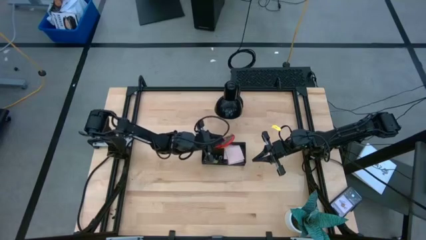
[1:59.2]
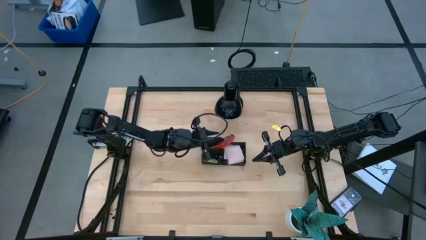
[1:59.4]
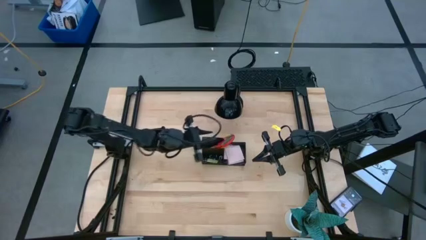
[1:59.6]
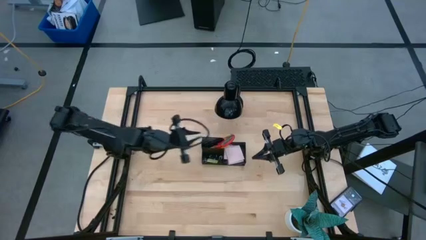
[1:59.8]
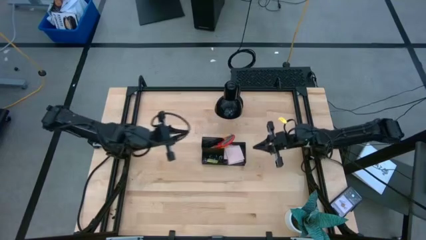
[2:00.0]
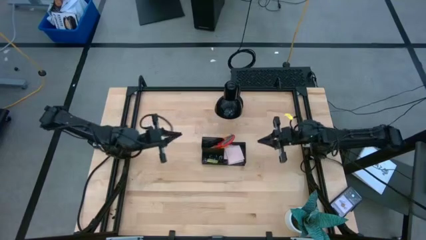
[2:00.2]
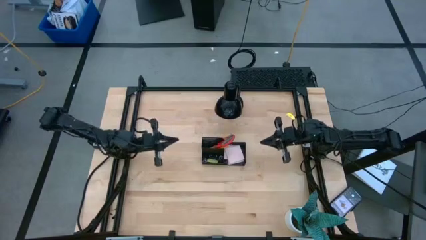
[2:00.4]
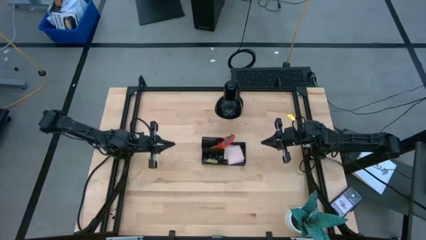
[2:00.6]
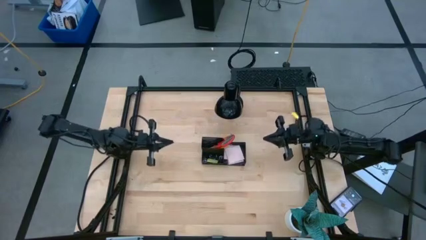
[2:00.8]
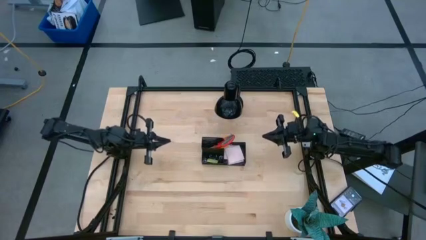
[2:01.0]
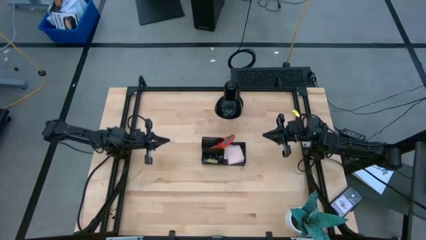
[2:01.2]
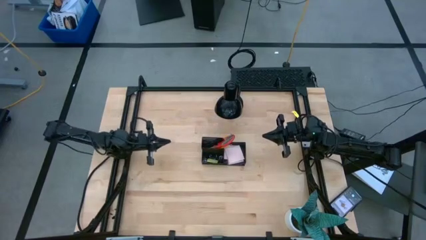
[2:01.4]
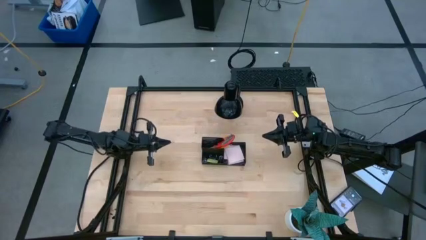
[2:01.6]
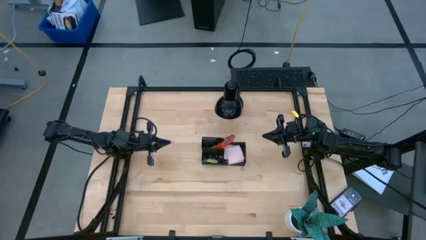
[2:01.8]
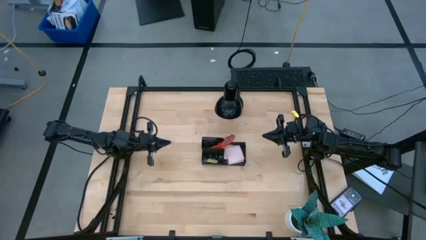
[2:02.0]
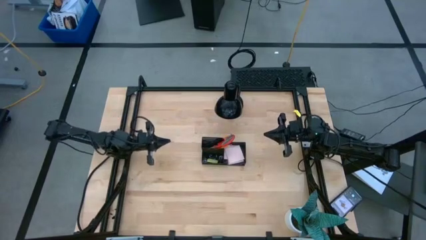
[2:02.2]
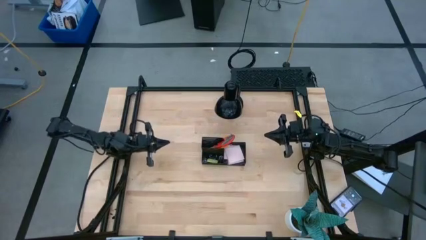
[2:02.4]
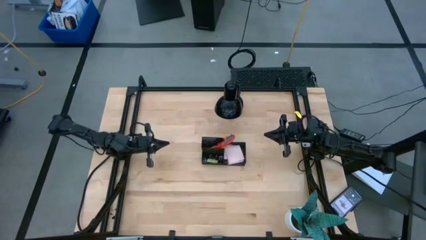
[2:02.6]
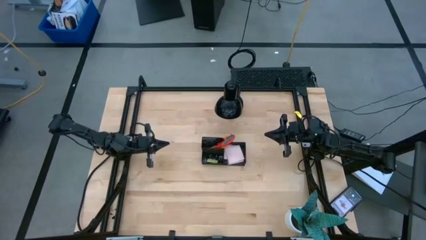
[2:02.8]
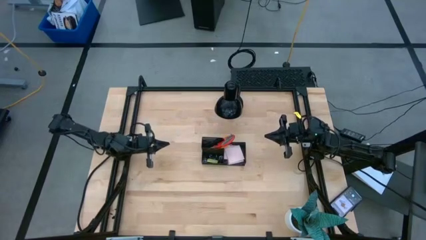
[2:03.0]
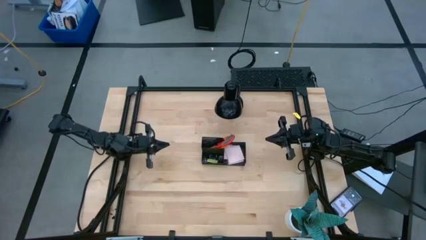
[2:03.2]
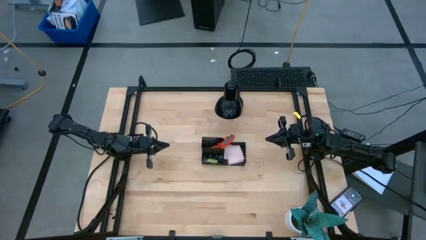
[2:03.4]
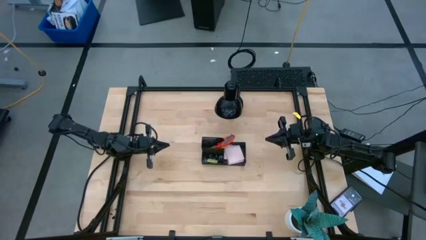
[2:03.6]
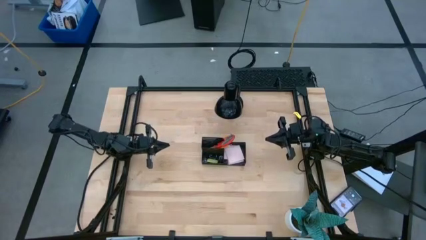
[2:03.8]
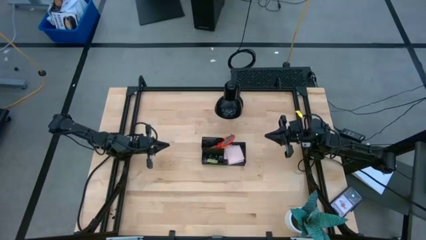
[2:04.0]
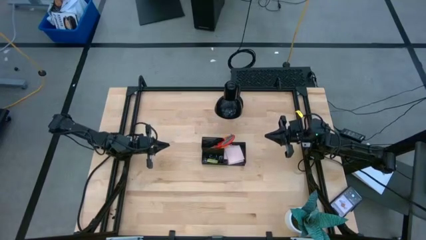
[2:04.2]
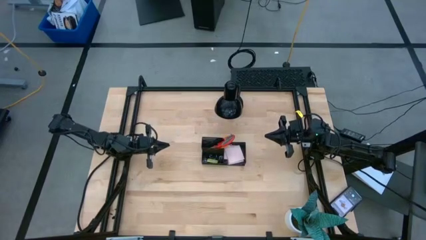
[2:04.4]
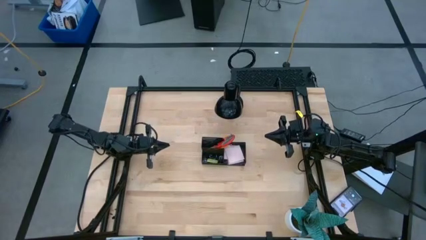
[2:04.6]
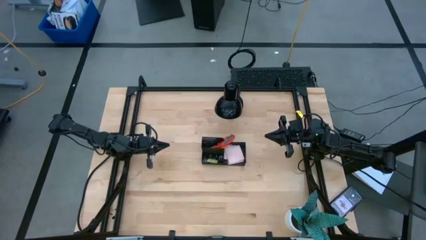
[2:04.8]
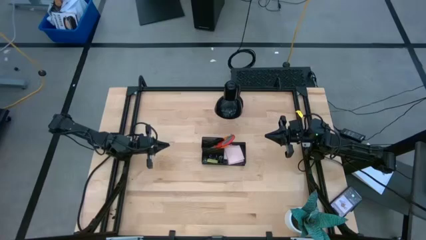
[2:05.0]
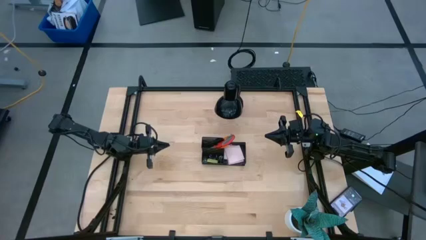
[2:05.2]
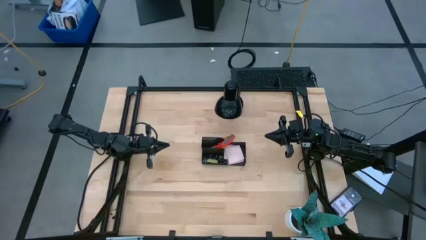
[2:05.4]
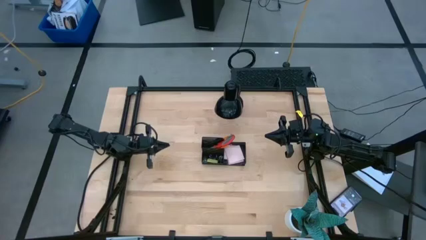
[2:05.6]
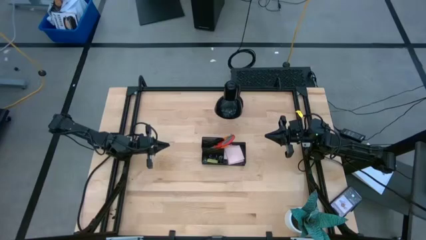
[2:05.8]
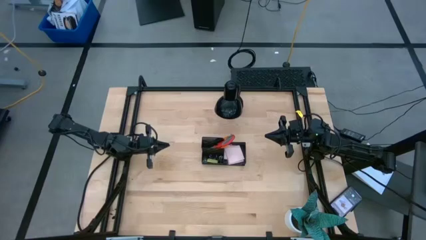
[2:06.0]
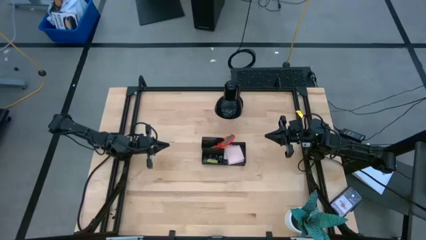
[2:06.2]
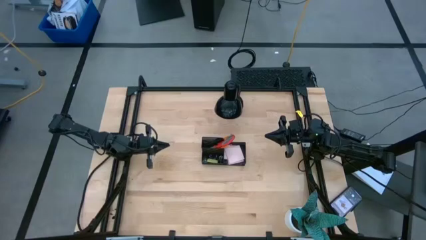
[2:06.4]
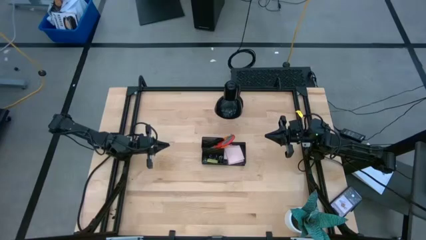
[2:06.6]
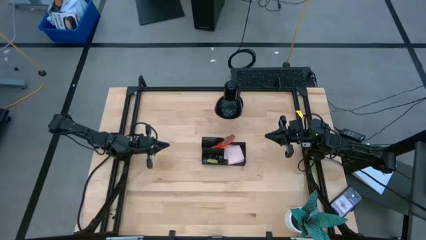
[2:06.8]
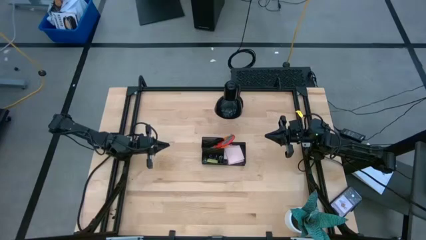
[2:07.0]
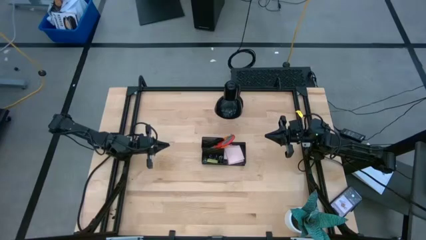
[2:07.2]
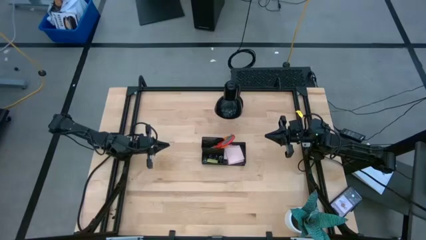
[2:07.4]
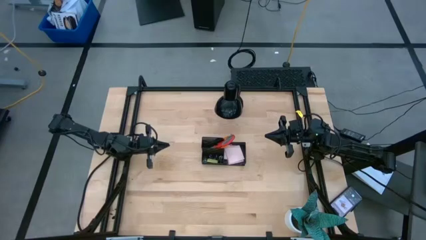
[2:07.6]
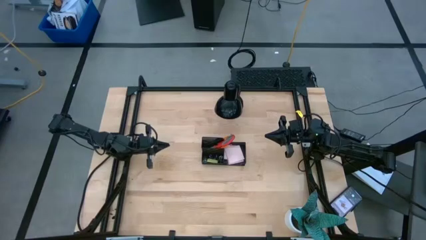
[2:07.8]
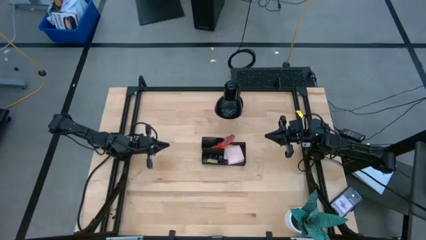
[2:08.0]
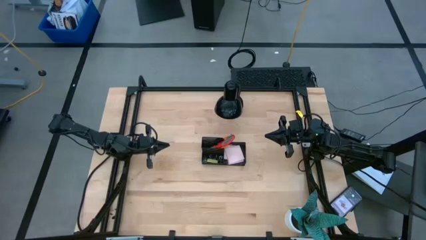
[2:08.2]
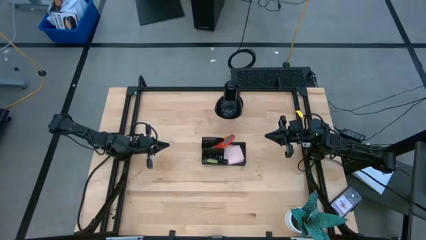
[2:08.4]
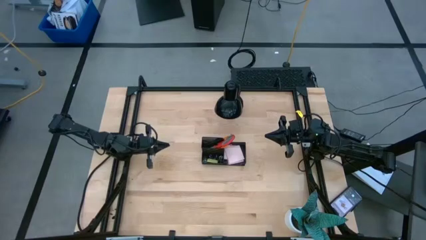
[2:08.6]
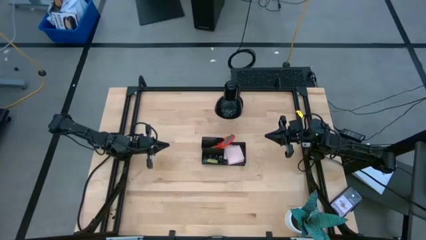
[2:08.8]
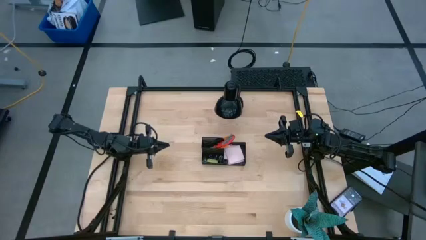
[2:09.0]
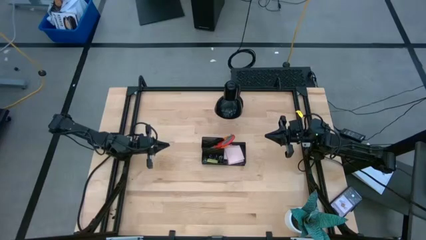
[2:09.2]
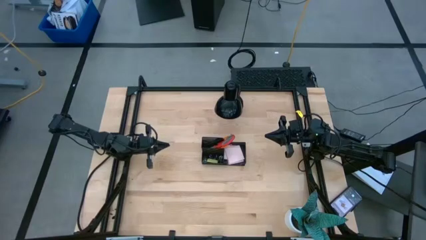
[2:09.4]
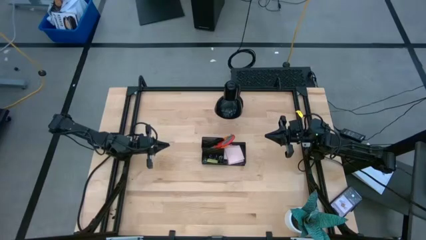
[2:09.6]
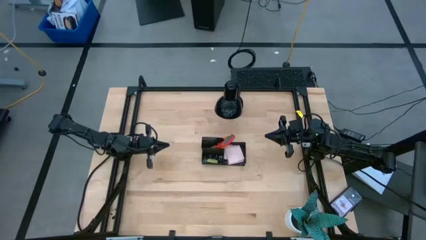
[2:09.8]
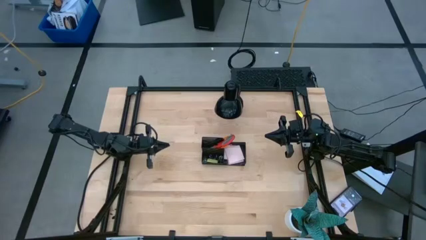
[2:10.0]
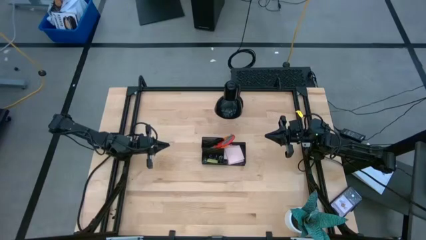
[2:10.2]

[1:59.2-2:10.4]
Task: Pick and place office supplies into organizer
Return to Home Position

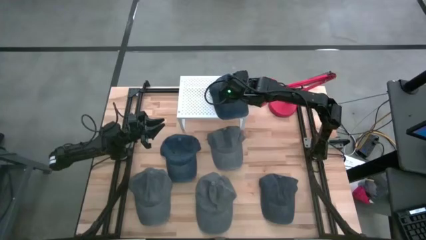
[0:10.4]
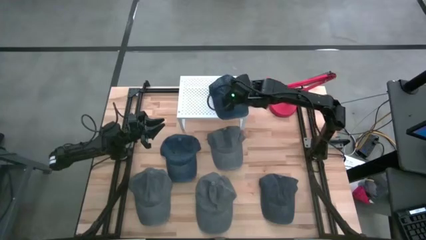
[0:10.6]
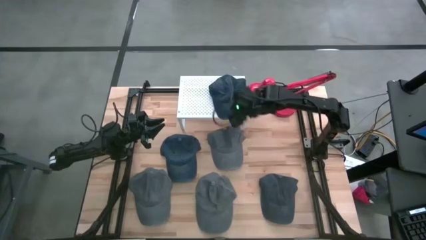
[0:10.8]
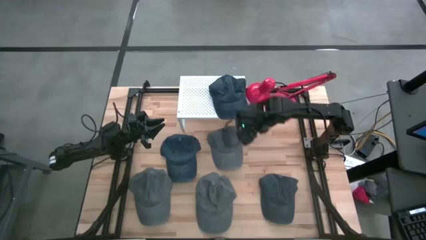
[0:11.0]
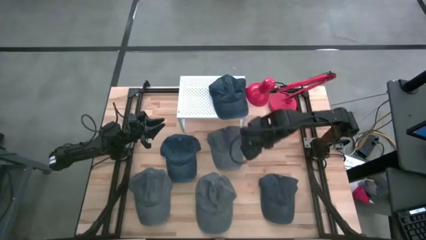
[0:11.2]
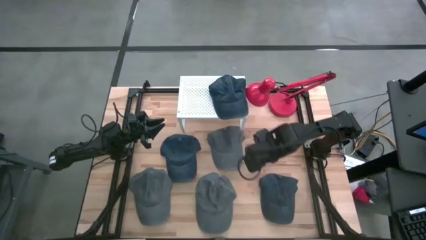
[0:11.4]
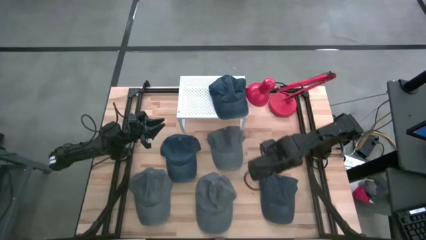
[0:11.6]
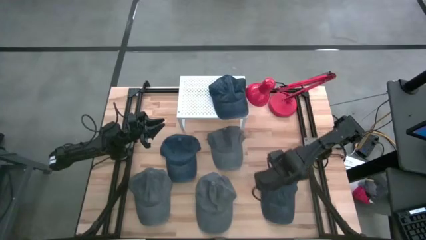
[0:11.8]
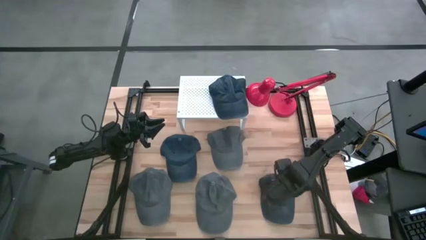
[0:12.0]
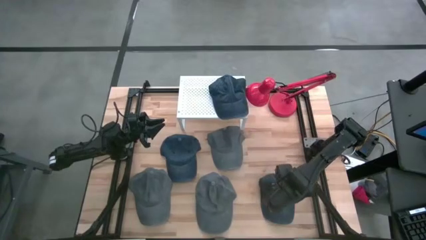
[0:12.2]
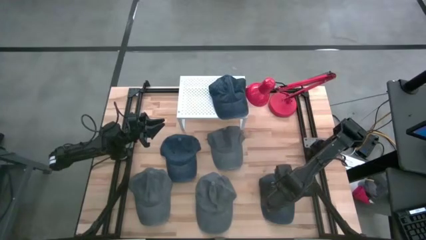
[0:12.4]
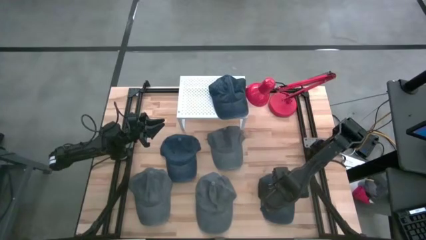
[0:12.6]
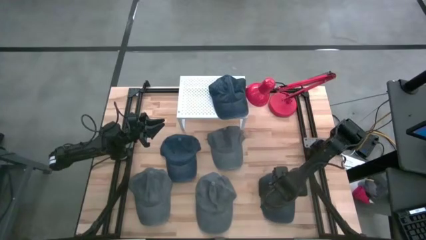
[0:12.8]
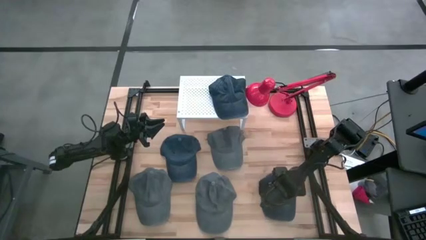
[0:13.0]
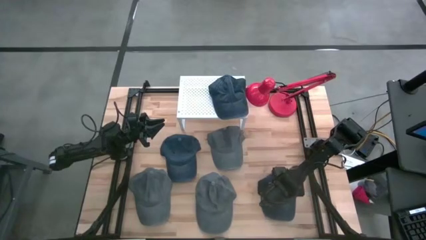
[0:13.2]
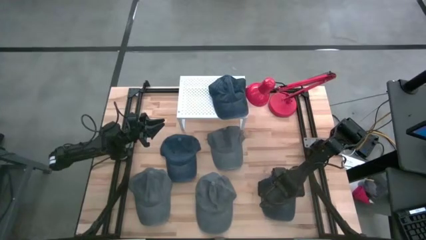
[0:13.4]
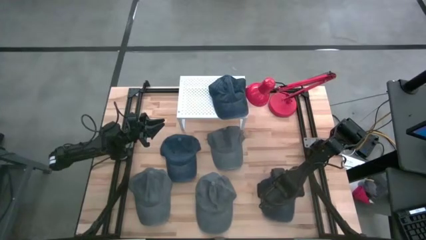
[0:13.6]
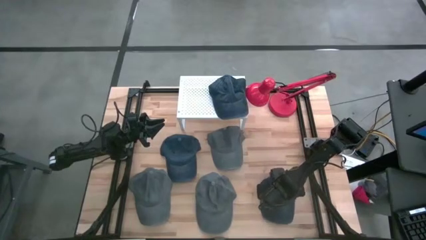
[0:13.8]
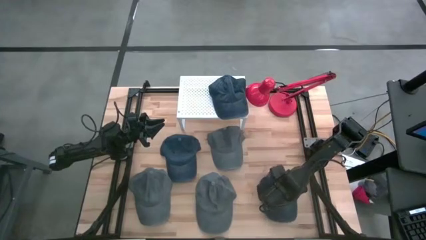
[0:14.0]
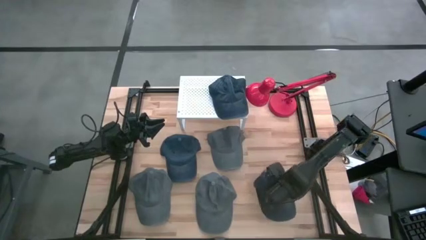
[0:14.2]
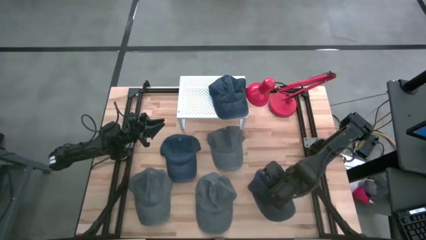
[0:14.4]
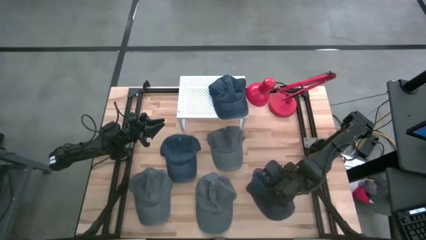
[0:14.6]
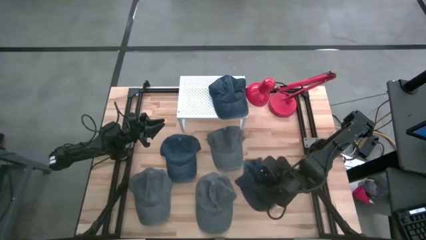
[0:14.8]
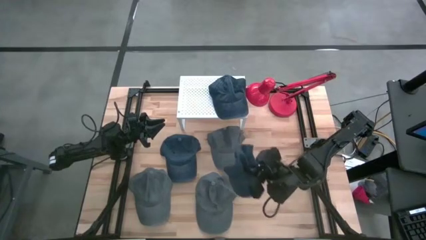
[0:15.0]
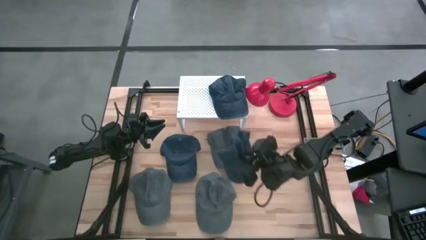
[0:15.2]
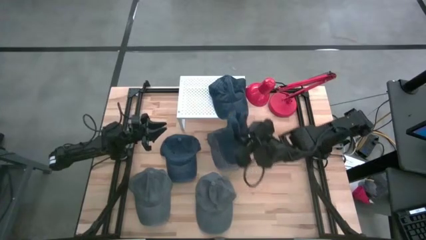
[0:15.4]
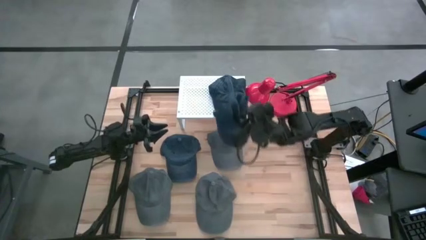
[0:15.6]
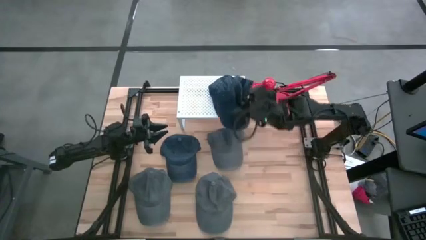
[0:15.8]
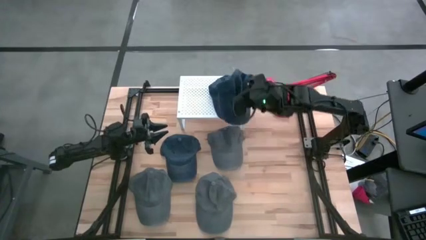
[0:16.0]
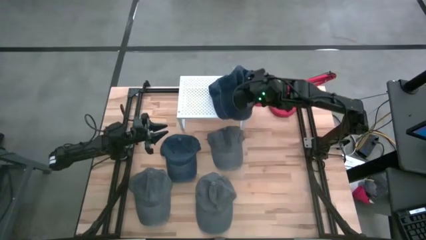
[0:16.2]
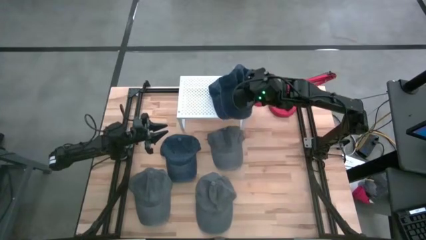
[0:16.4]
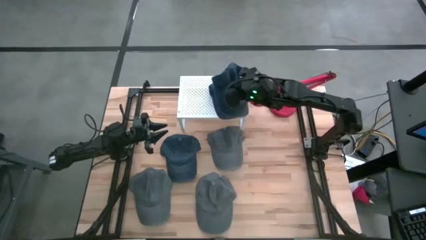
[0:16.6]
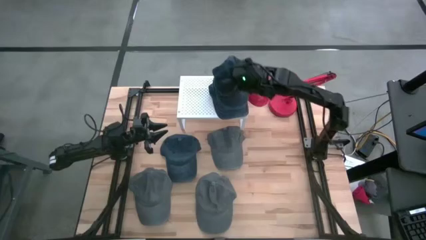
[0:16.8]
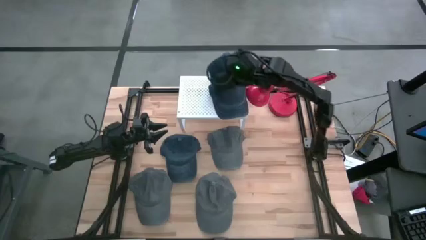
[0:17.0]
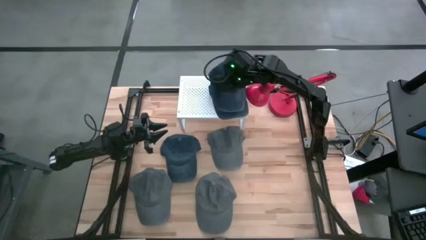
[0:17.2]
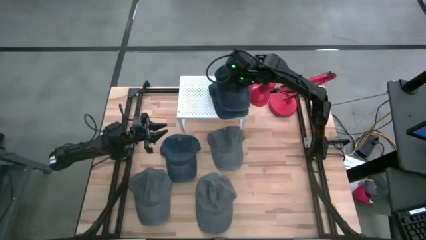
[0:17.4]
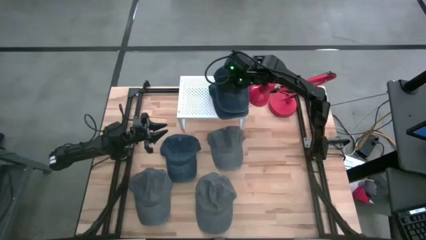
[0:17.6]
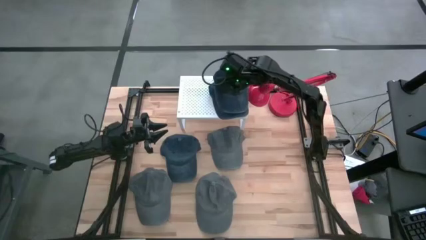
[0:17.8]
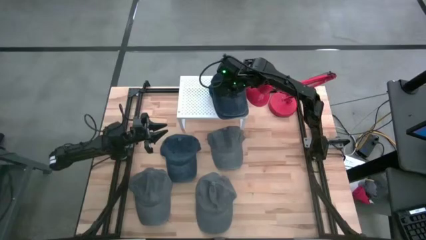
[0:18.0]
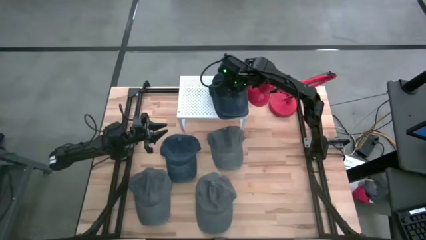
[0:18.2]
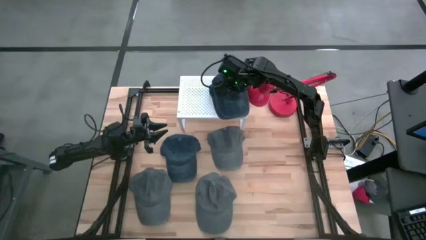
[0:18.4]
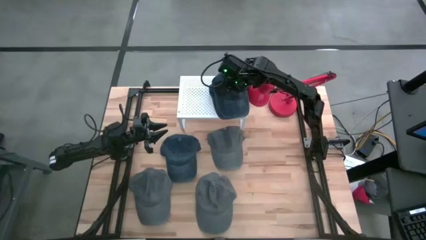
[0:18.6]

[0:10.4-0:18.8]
Task: Pick & Place hat
Stack the right gray cap on the top of the other gray cap on the shelf
